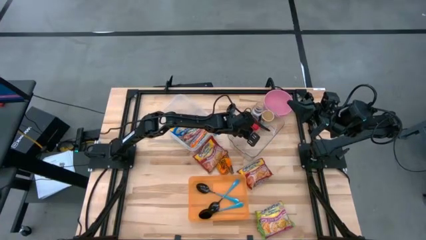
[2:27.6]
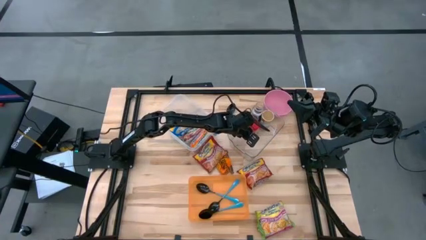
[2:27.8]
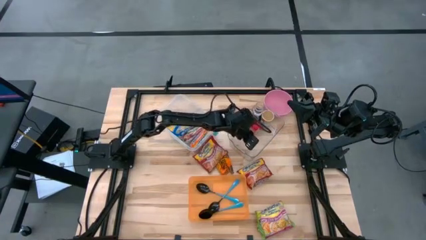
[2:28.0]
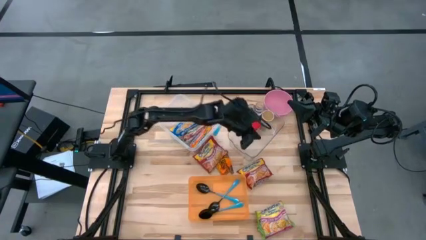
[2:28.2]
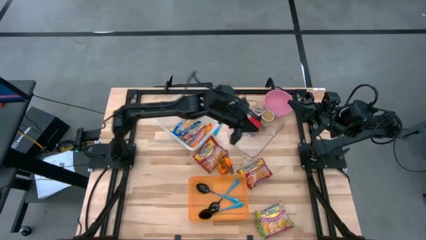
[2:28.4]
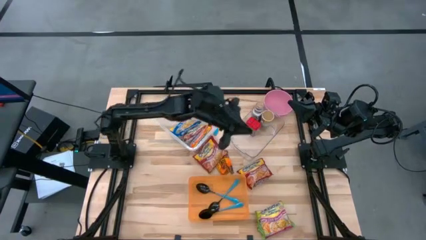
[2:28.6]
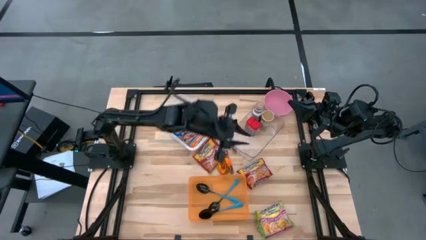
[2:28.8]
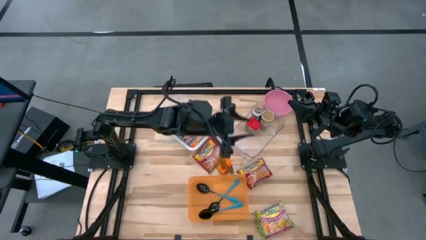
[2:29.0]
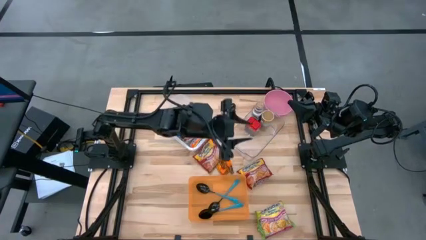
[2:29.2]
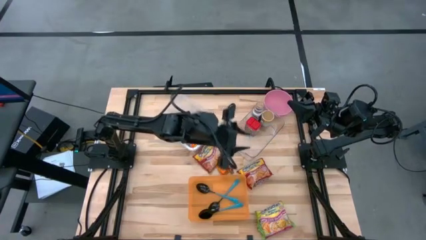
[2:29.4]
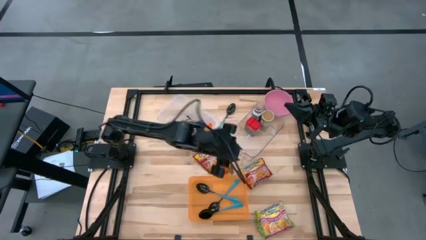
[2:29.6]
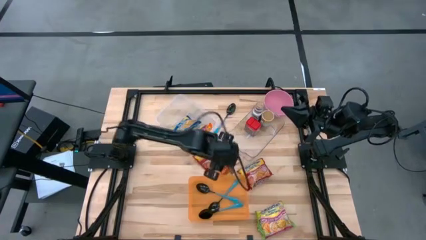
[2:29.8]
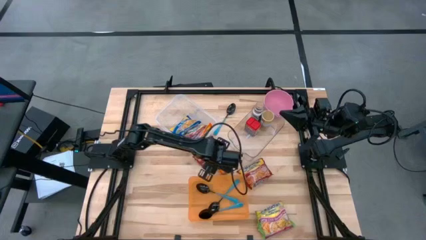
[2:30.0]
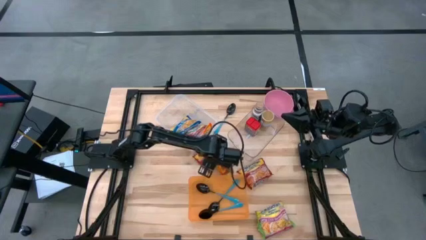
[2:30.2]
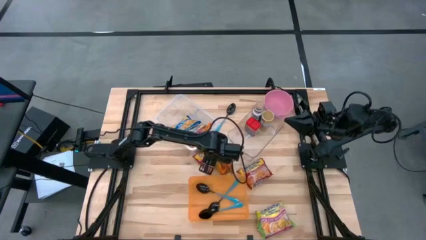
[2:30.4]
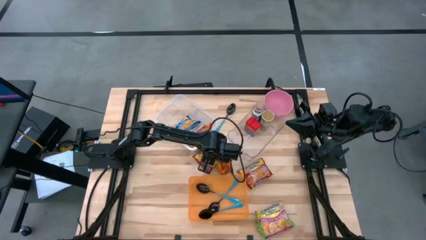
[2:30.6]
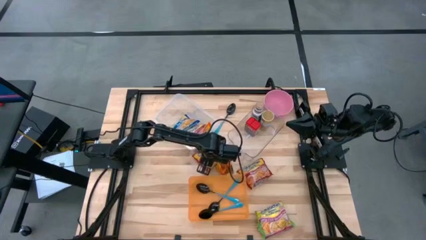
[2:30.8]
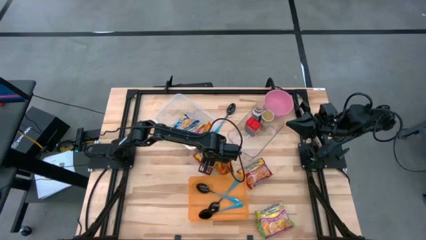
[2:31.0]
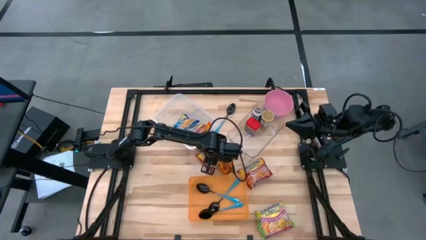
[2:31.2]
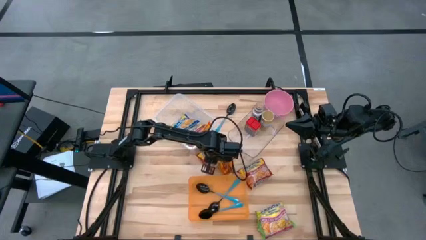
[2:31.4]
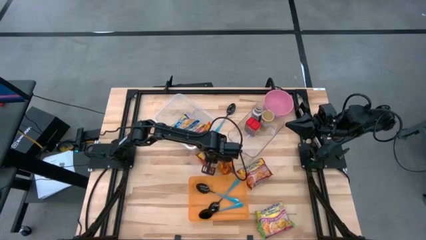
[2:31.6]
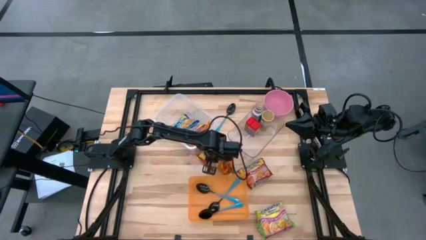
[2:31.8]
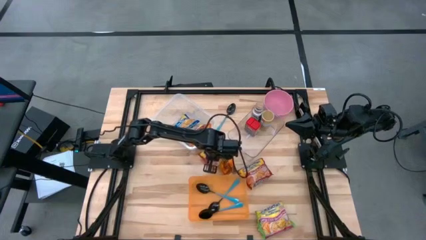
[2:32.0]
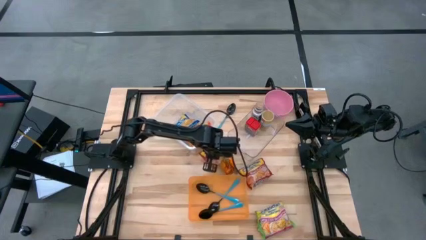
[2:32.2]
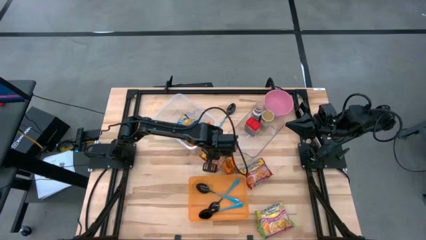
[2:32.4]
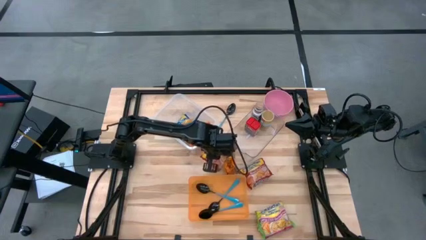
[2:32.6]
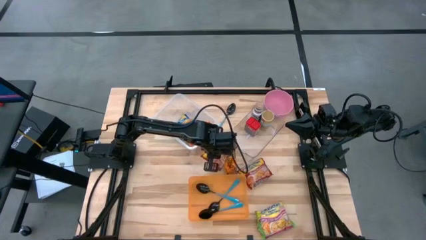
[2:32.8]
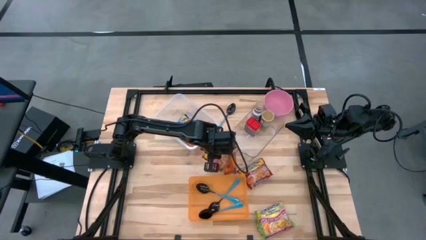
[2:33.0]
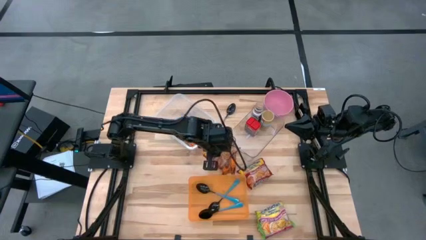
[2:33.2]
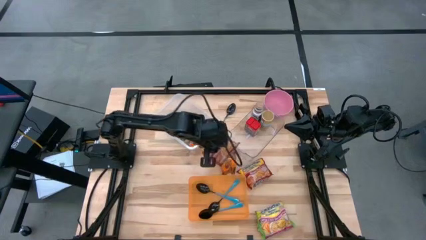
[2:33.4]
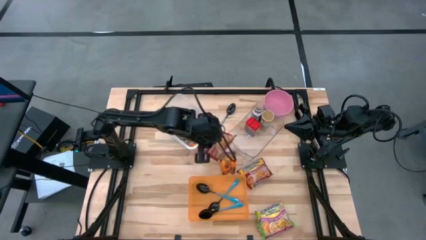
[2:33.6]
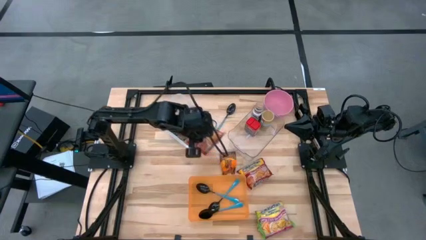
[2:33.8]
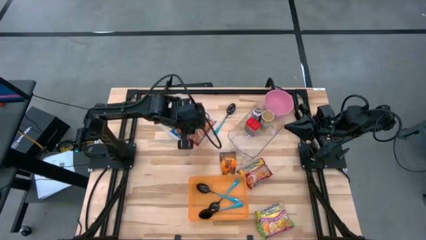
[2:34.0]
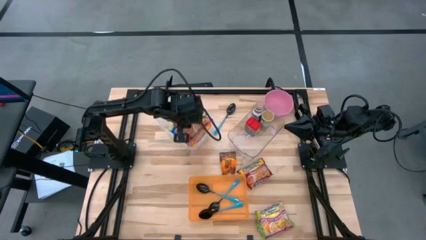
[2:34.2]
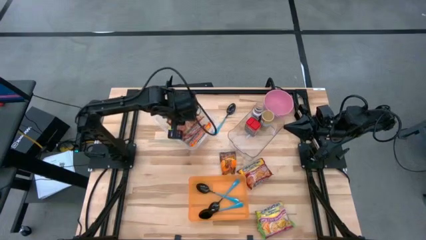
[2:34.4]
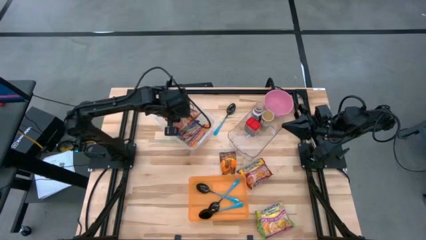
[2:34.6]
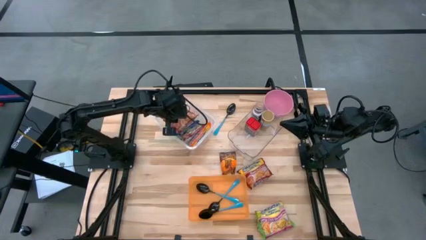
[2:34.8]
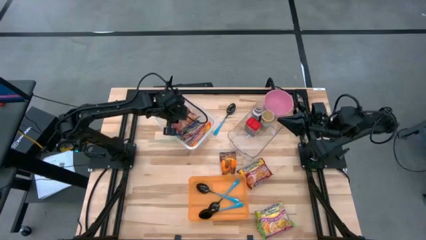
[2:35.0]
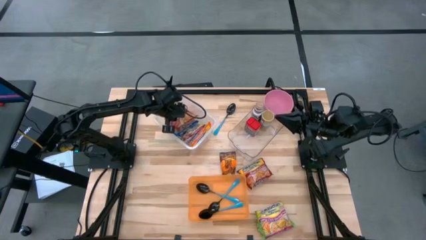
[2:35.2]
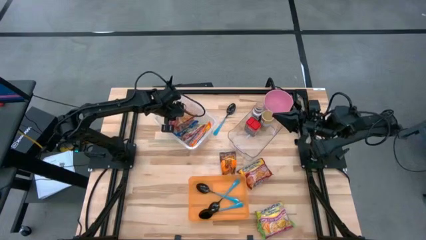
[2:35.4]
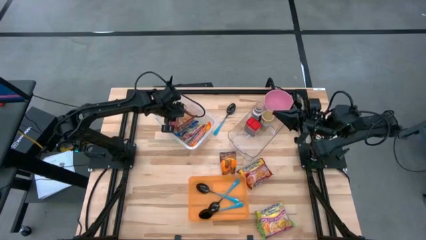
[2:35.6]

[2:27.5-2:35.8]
Task: Pick & Place Food Item
Put the red noodle pack into the transparent container

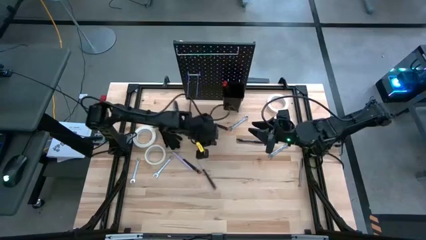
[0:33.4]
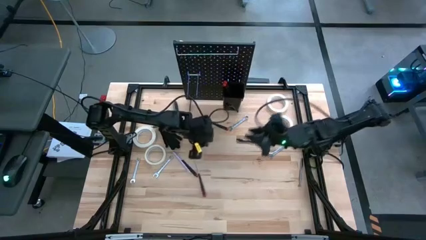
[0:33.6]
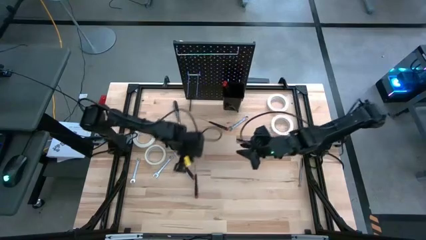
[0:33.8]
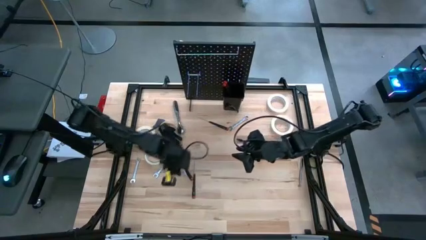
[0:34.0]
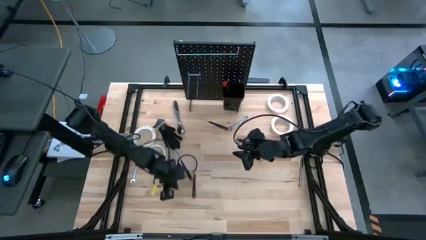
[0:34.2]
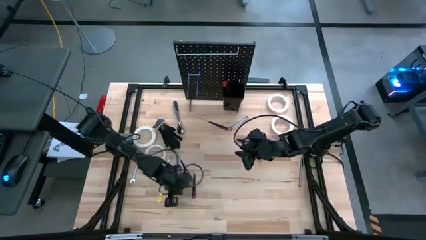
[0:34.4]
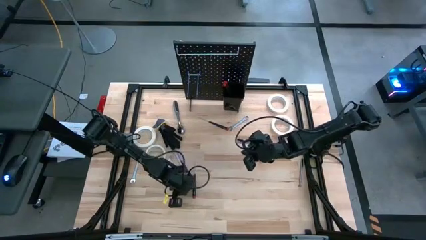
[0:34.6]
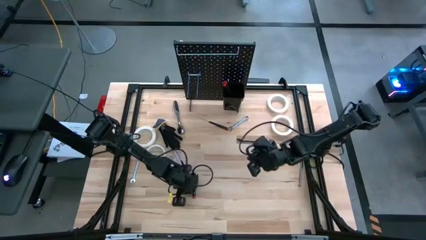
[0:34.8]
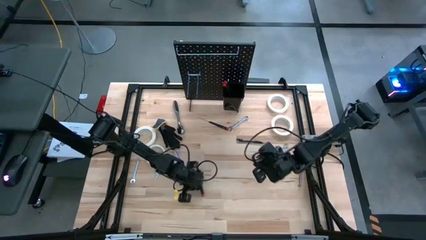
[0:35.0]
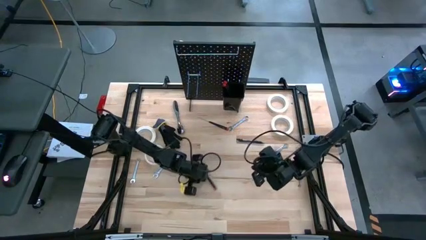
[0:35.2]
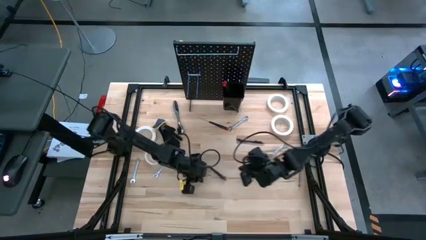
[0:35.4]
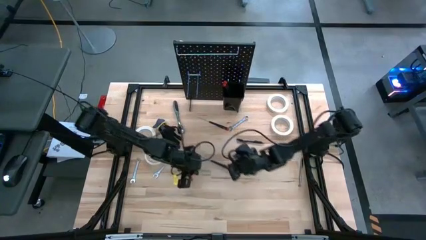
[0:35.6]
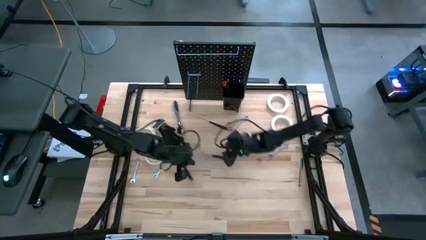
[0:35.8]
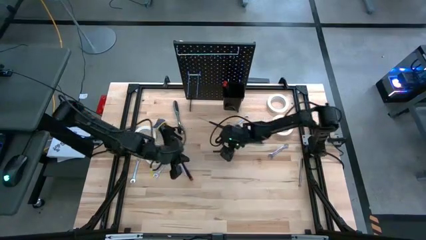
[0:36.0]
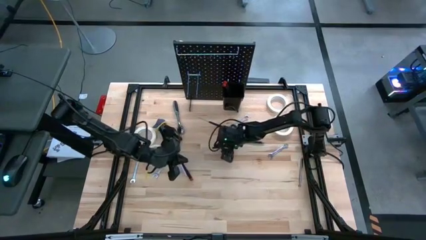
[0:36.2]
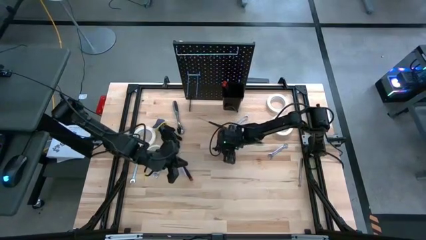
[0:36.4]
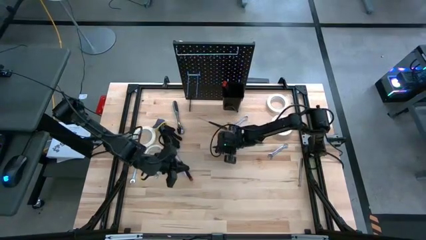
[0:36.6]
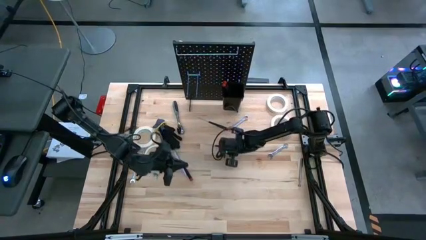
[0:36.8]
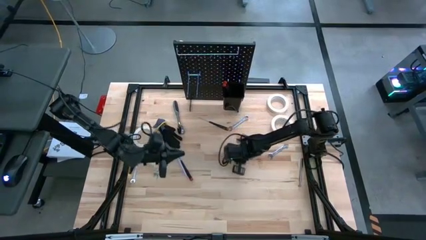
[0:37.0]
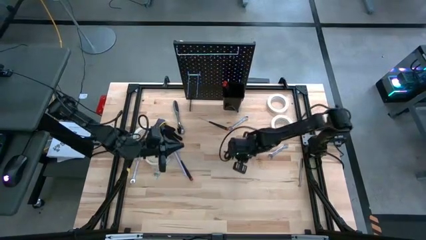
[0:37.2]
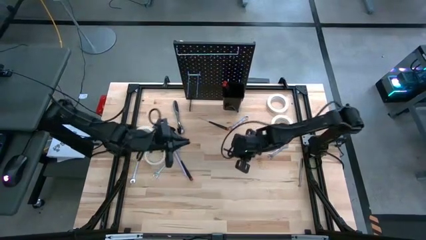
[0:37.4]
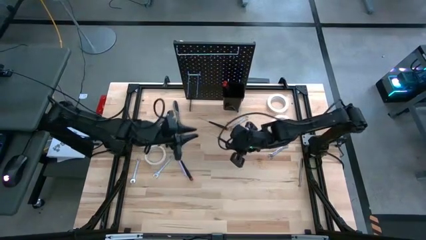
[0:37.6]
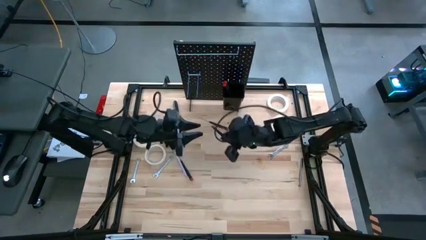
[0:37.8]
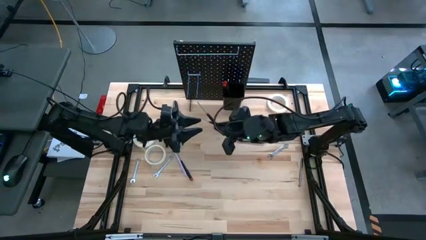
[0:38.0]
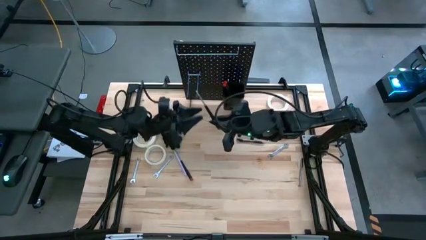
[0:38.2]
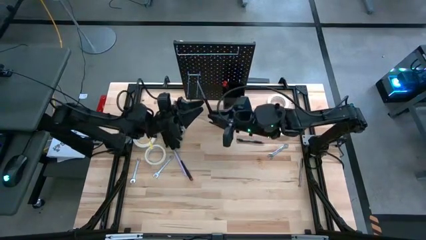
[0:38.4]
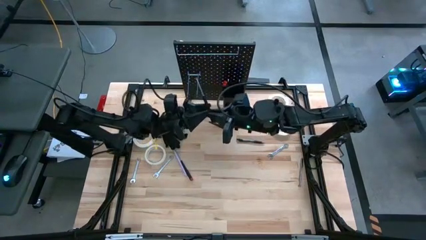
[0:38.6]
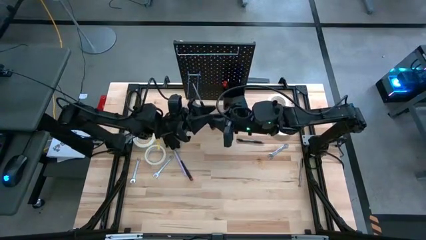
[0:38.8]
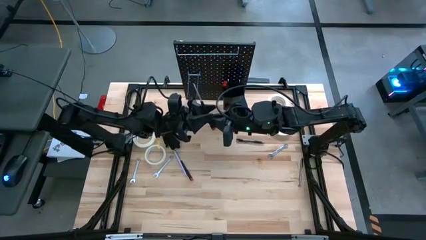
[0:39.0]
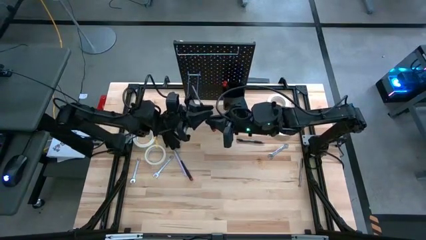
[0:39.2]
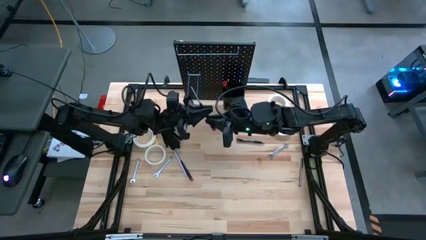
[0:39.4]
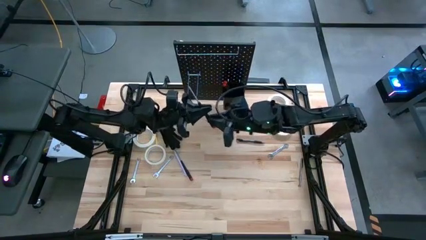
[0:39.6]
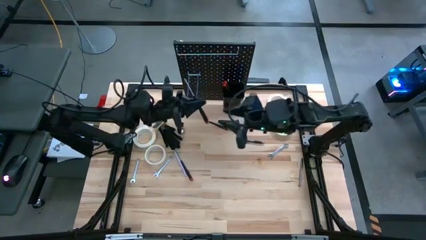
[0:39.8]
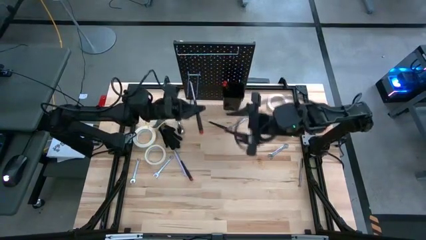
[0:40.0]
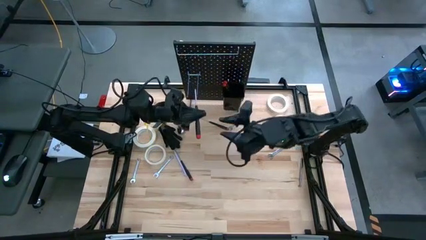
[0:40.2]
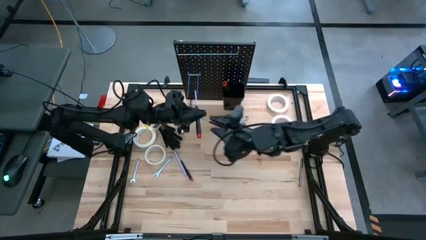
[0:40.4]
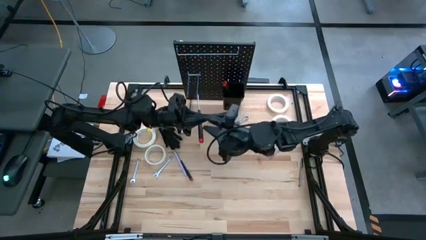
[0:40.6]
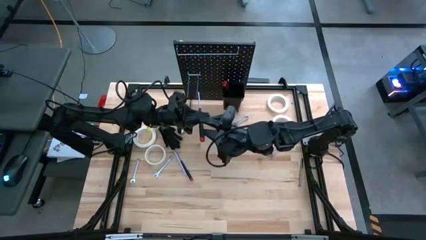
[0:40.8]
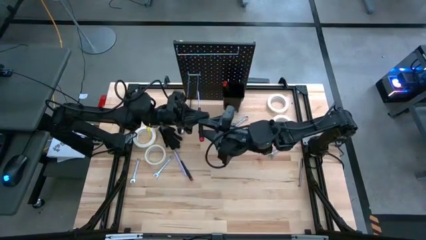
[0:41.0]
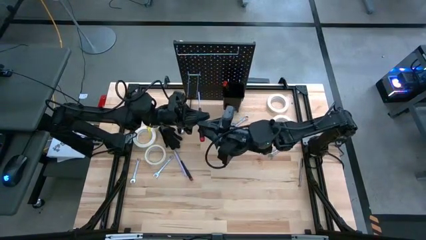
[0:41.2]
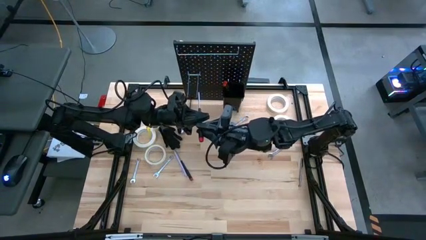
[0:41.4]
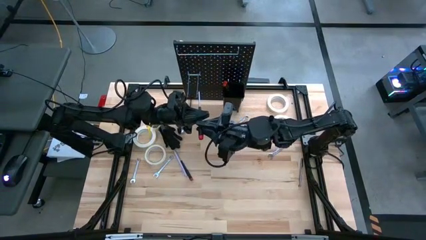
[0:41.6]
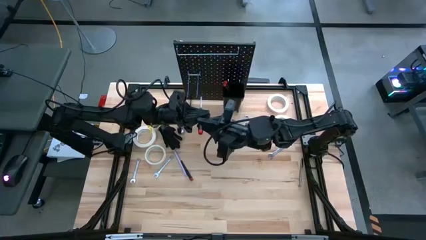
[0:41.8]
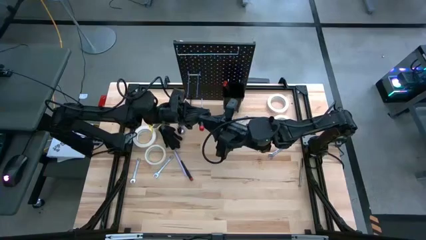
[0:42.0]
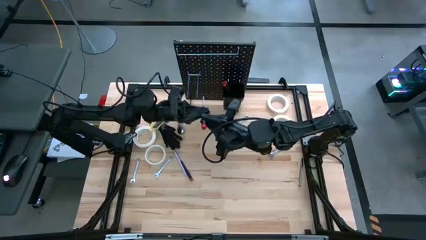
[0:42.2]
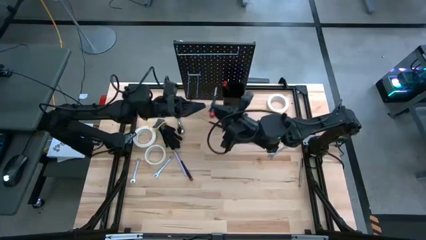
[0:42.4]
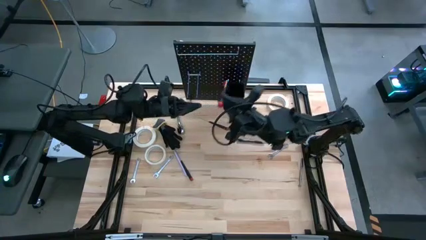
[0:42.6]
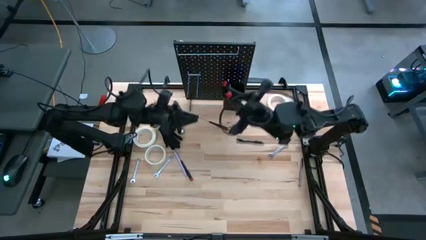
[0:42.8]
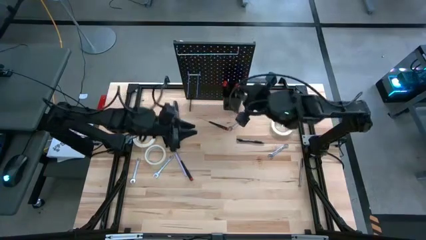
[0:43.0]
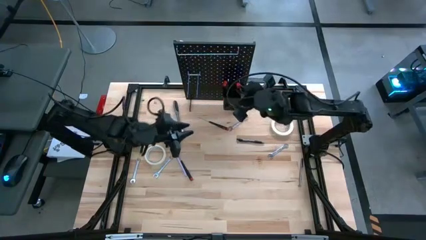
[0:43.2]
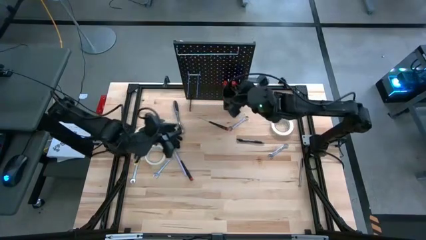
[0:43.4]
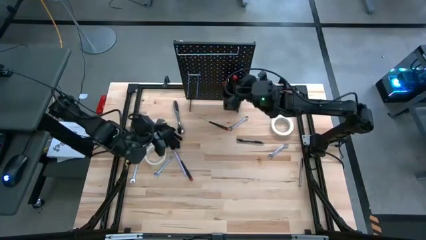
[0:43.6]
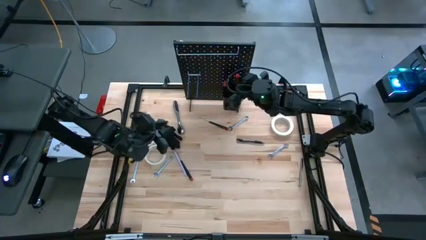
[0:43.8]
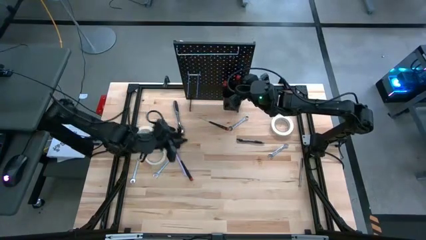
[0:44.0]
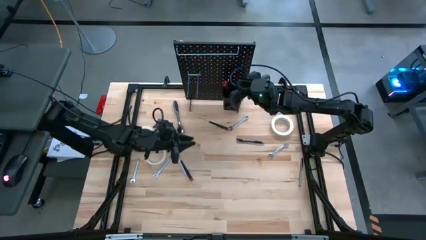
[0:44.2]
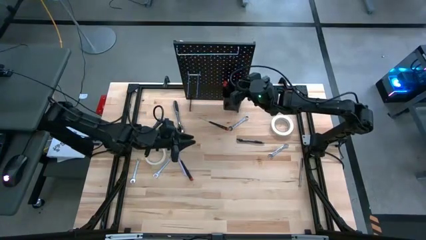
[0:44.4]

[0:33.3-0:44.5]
Task: Hang tools onto peg board
Put the nut driver into the black bin on the pegboard
